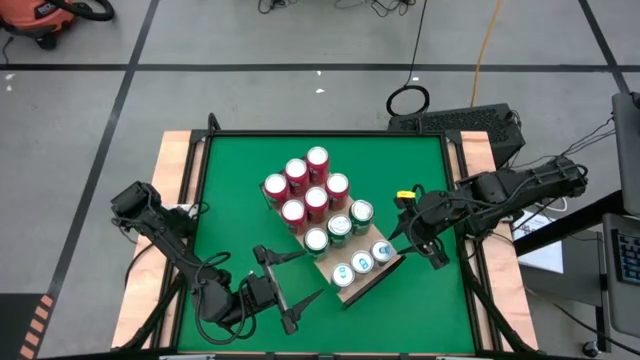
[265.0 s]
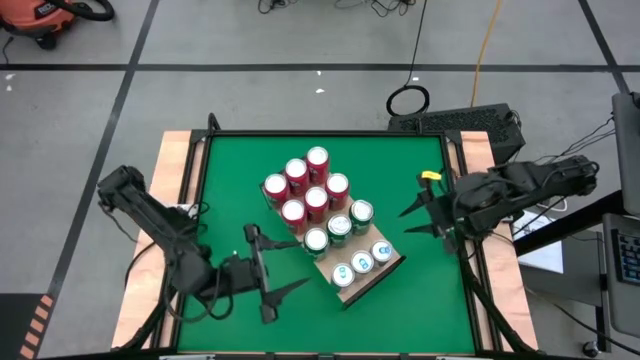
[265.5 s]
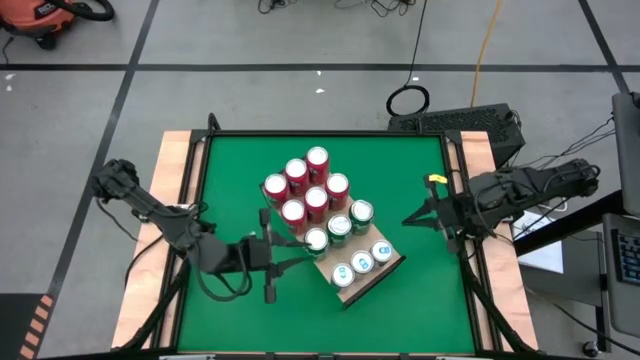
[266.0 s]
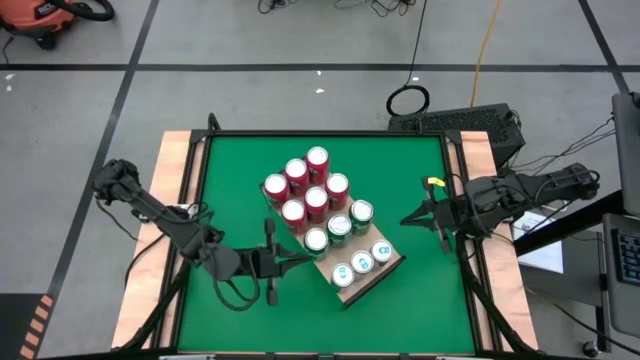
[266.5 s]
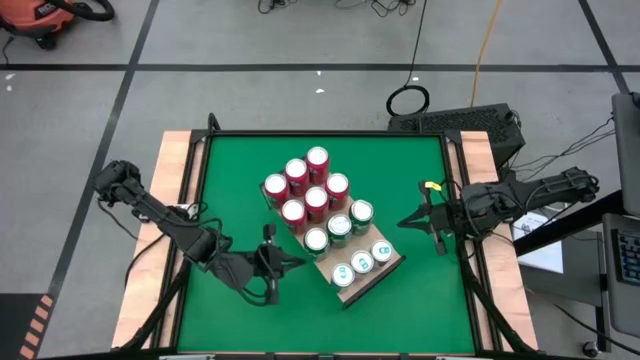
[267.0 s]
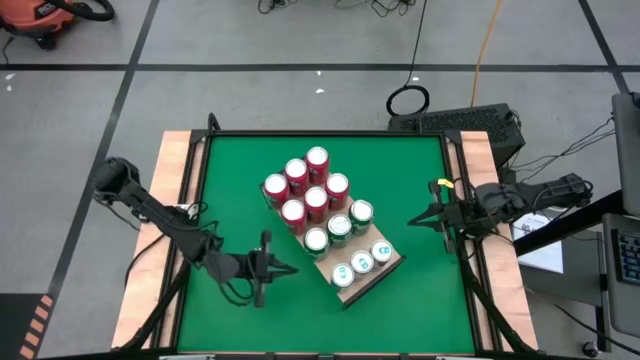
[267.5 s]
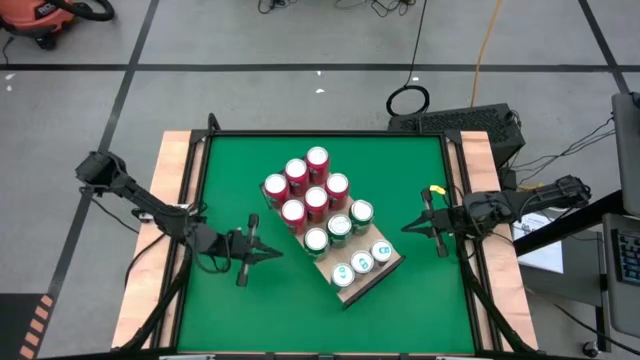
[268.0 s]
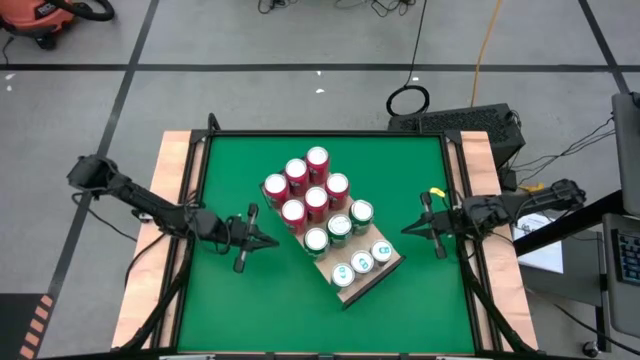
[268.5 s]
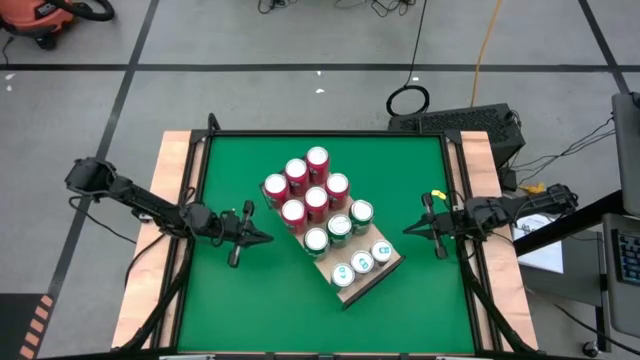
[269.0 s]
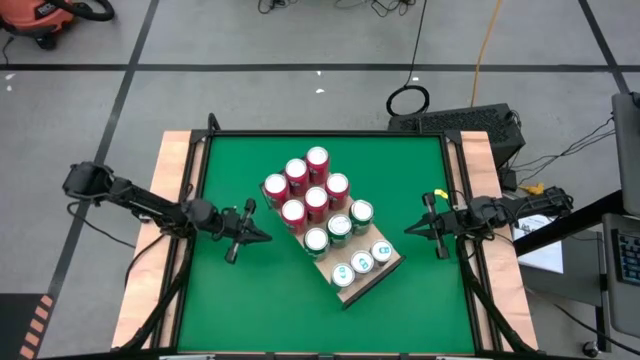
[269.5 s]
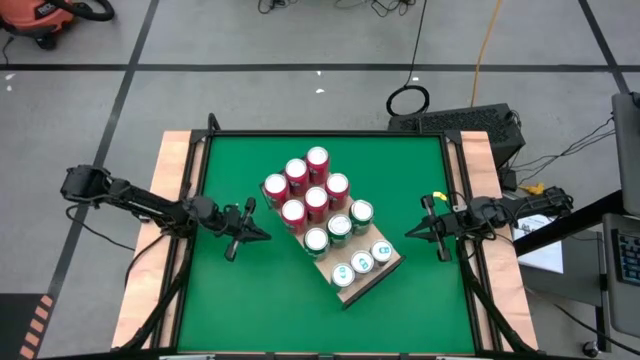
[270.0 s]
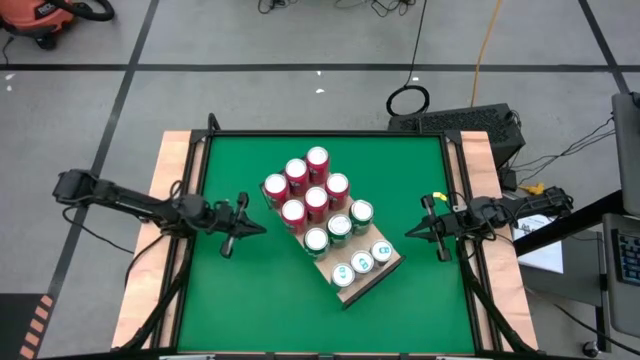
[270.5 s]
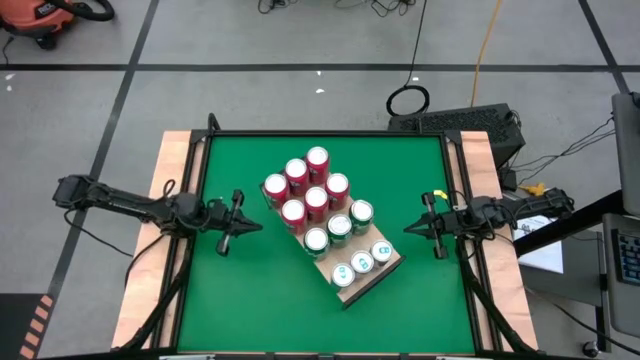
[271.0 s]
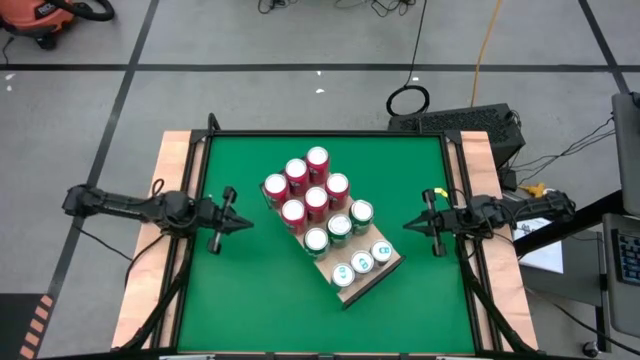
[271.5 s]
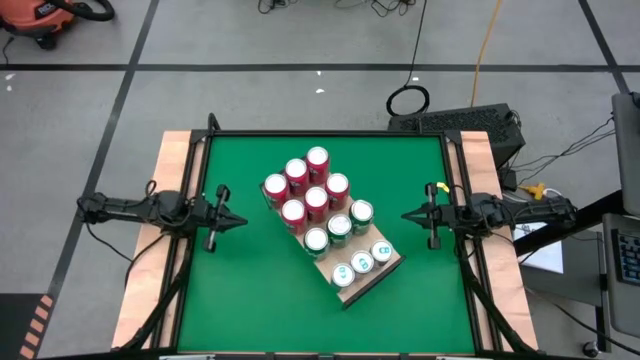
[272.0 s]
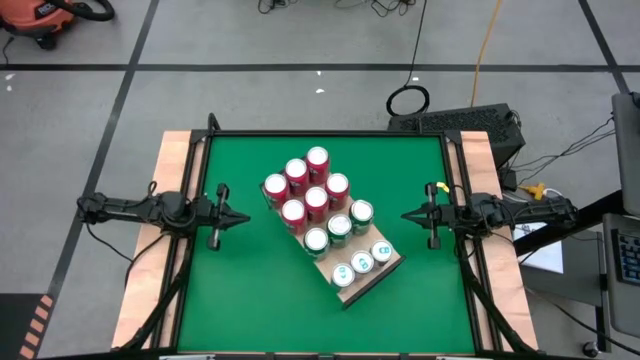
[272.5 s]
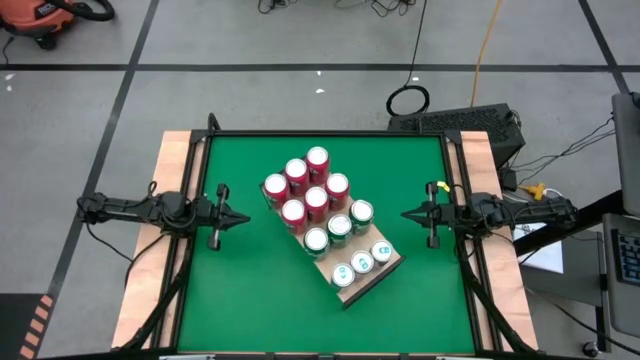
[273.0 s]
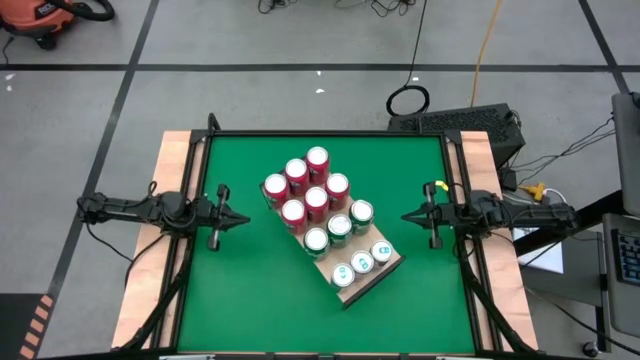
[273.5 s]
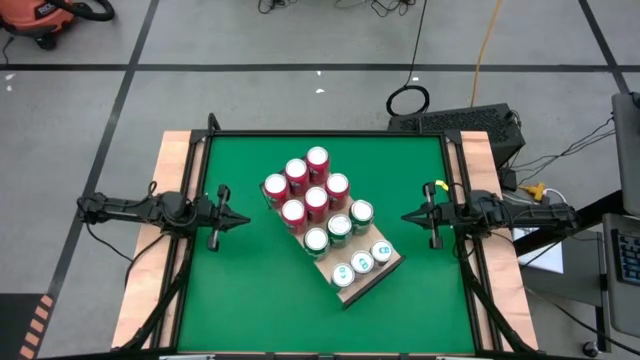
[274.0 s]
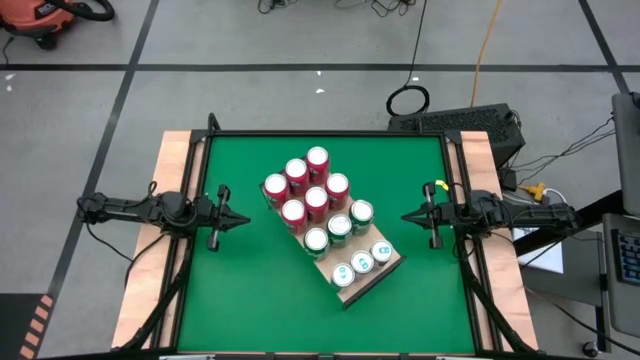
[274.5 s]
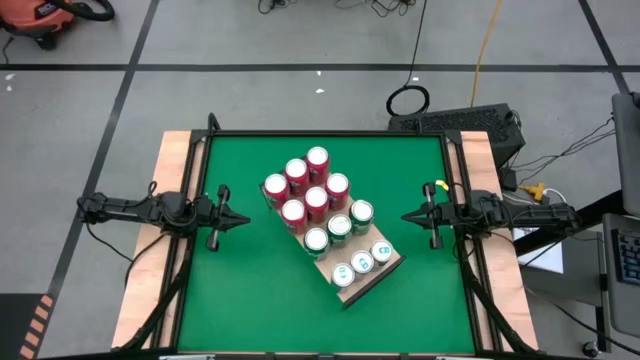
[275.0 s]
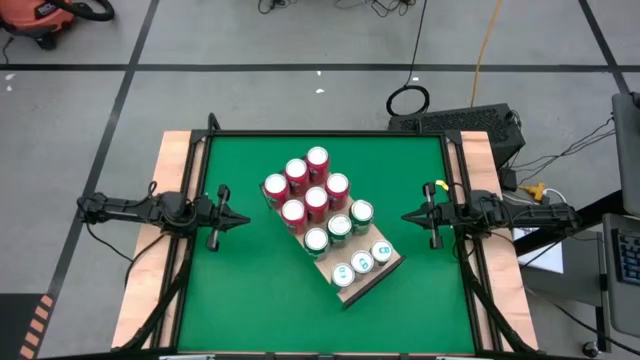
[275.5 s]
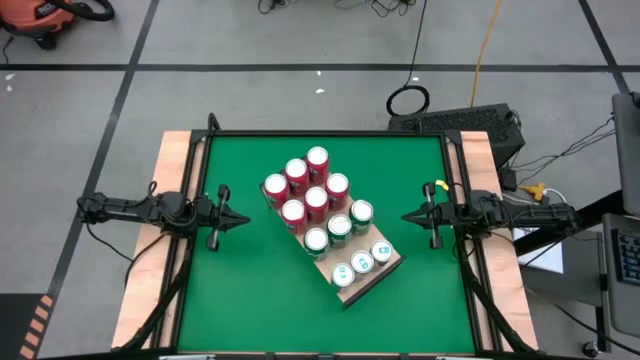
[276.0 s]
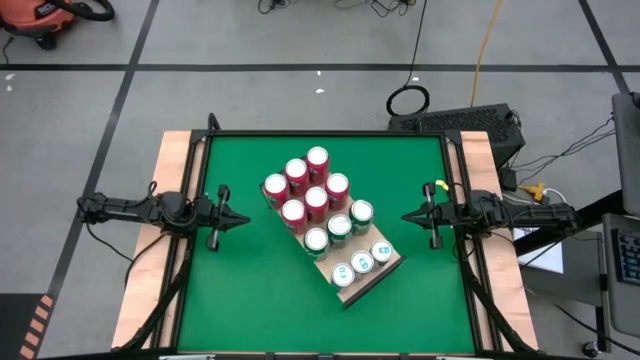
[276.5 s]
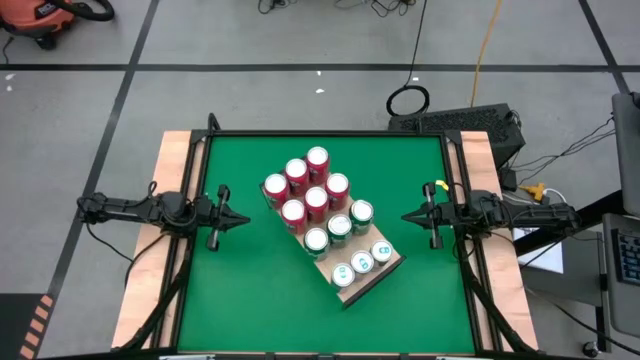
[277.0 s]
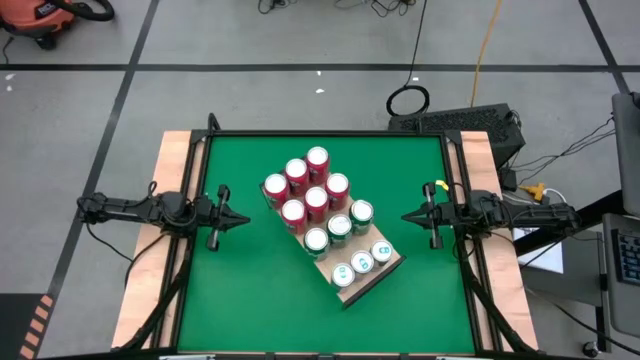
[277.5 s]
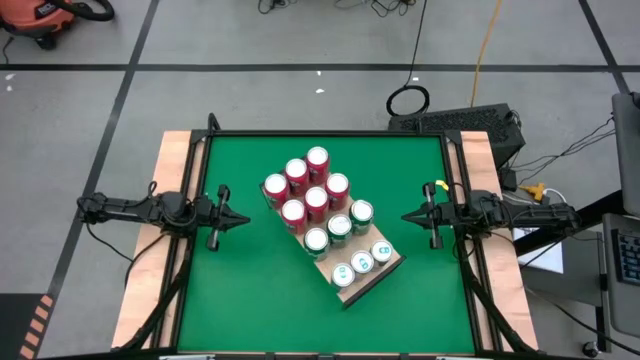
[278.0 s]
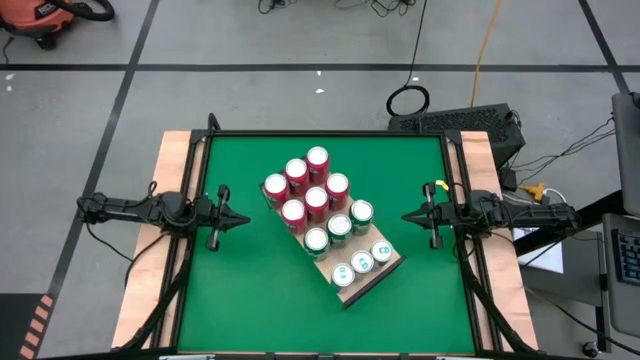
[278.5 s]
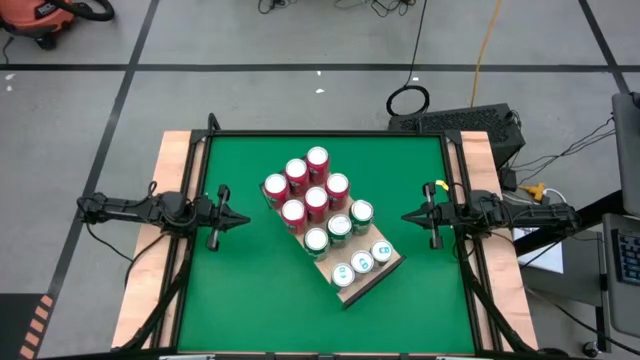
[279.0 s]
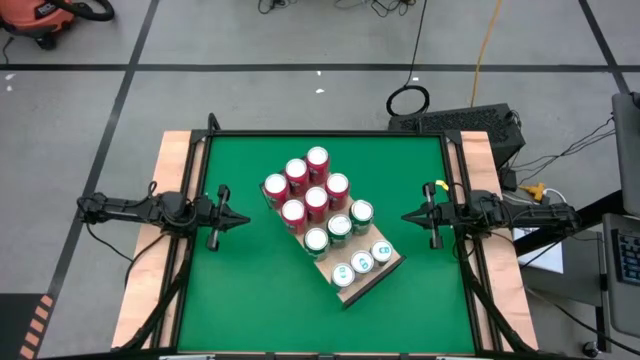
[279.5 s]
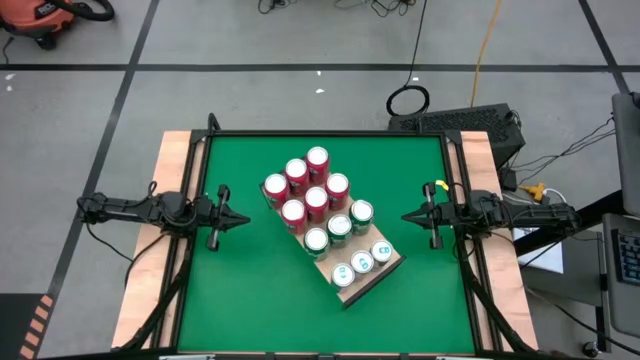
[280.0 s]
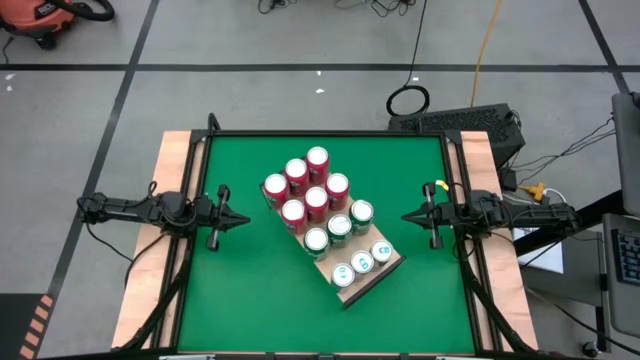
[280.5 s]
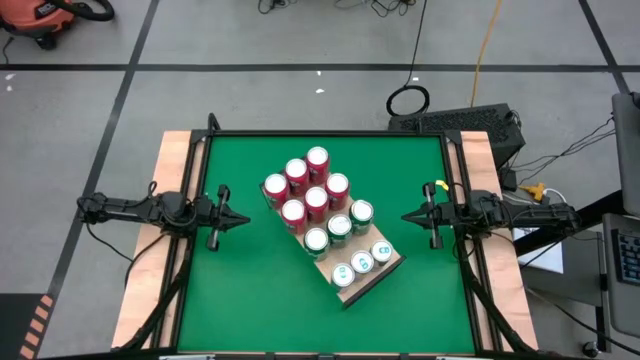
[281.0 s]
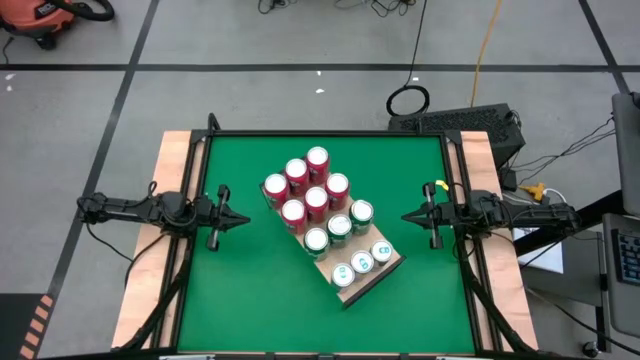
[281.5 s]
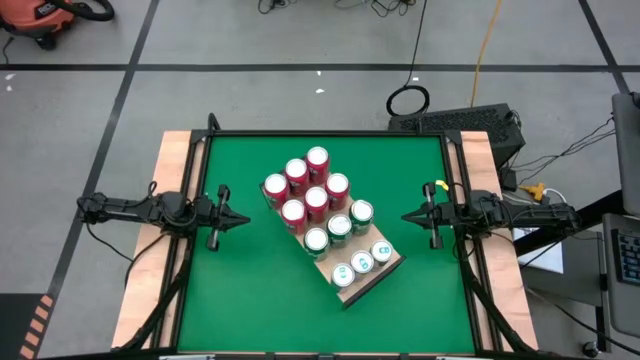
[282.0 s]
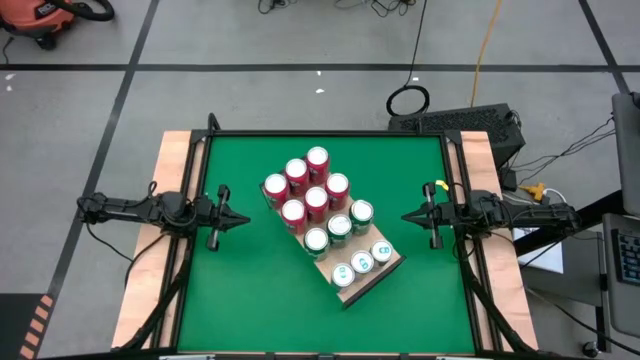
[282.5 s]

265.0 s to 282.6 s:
Task: Place canned beverage on shelf
Return to Home Position

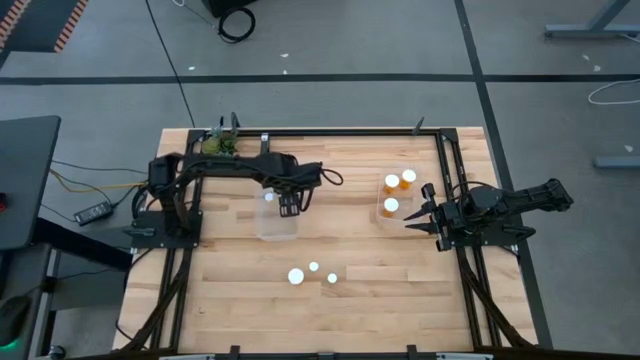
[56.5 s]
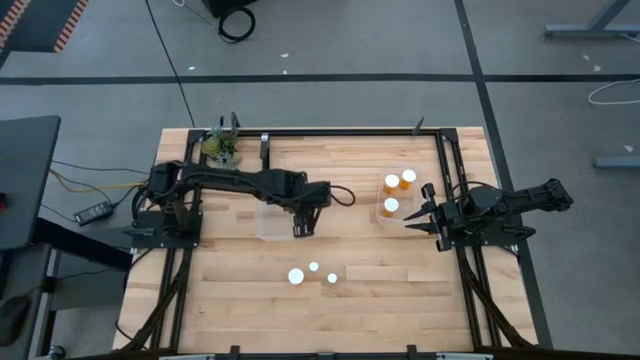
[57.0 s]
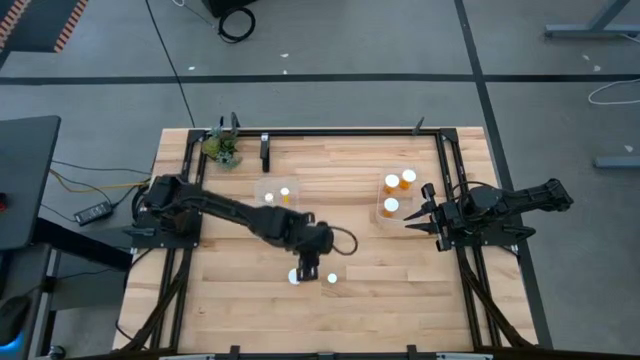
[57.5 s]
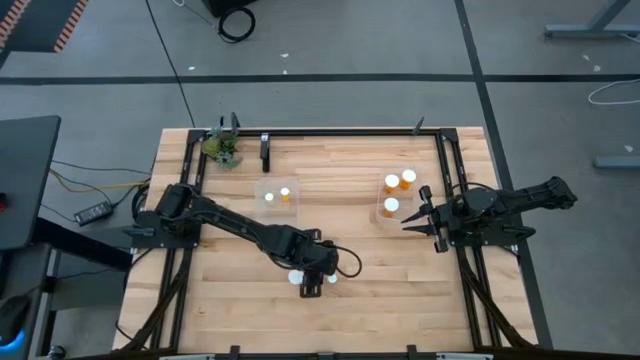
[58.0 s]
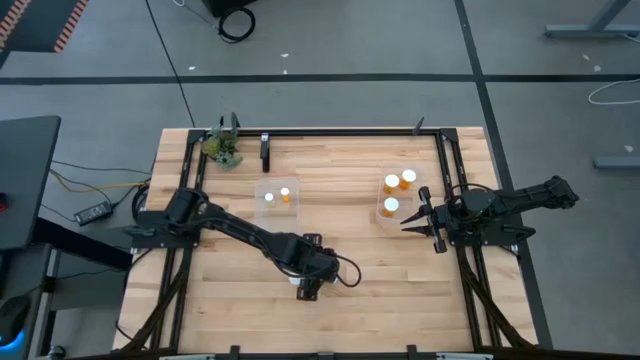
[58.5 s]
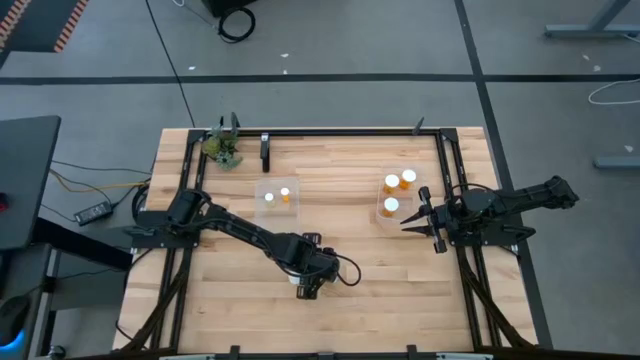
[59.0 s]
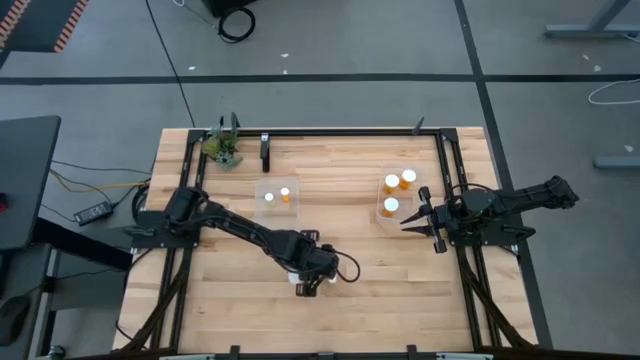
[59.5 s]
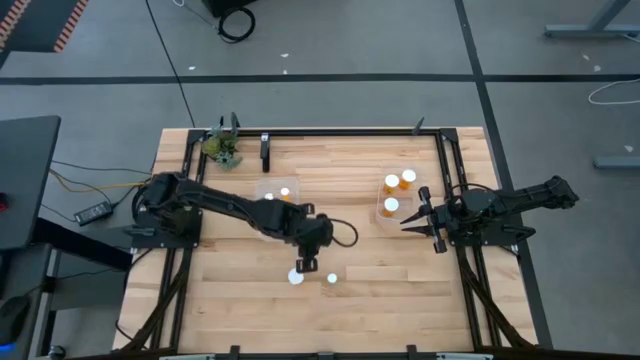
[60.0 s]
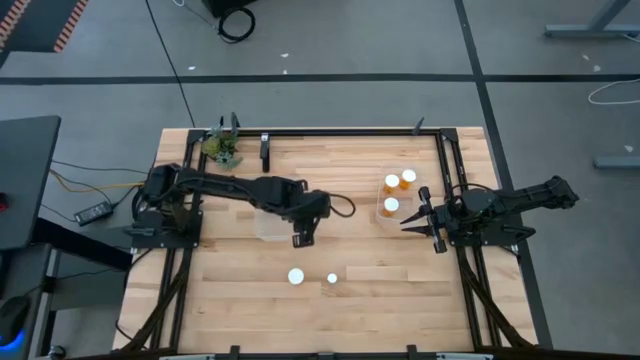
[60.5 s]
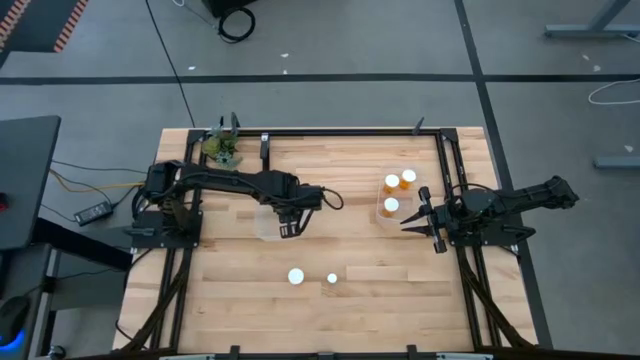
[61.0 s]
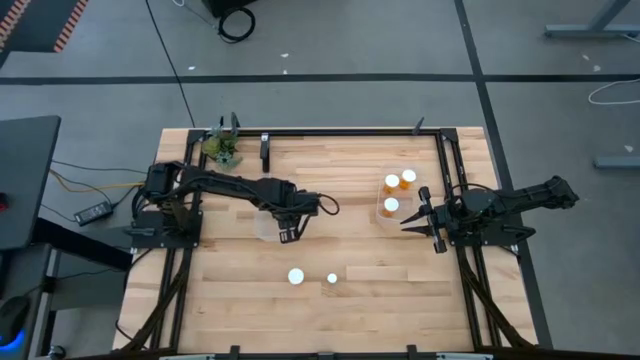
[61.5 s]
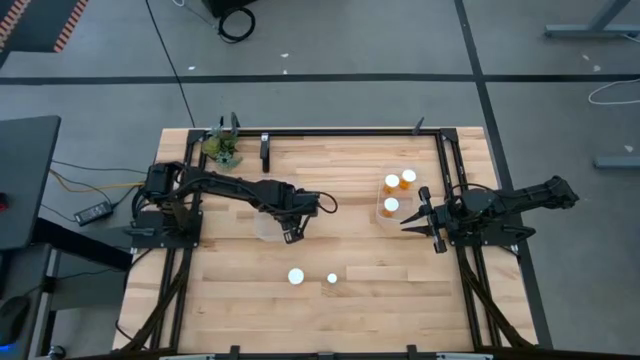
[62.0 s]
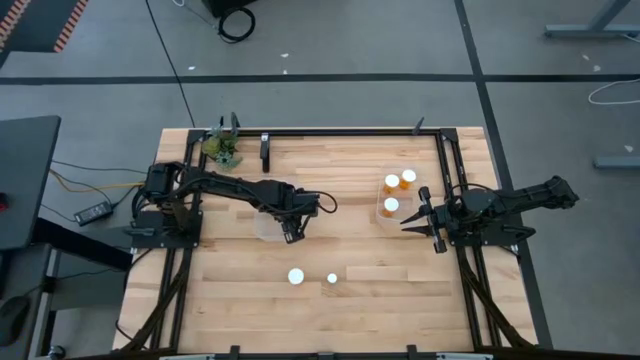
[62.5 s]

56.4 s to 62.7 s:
Task: Pick and place medicine bottles into bin by pill shape (circle, oval)
Put the left small yellow pill bottle into the left transparent bin
